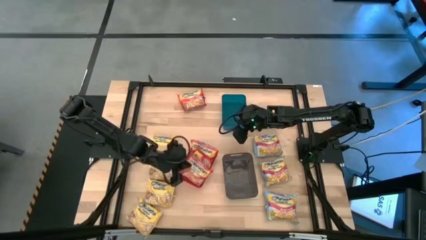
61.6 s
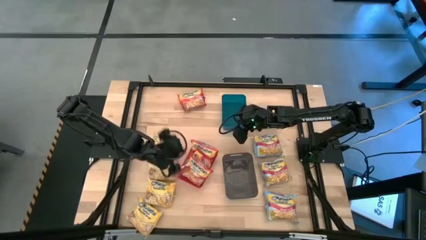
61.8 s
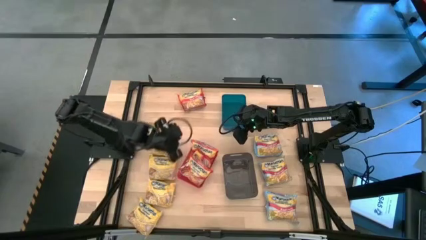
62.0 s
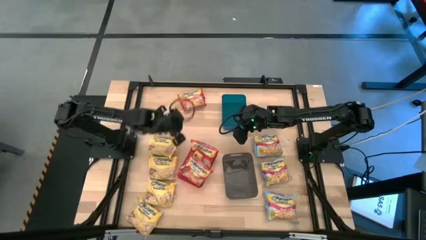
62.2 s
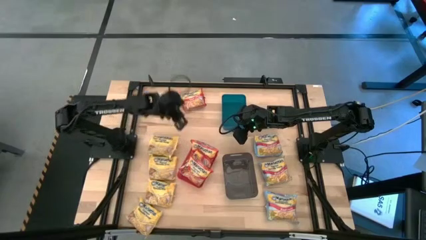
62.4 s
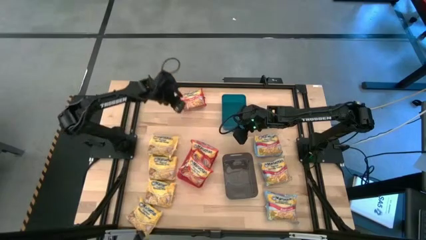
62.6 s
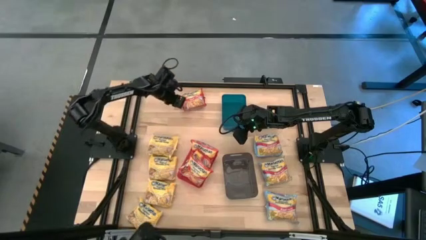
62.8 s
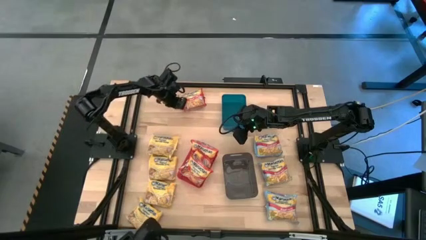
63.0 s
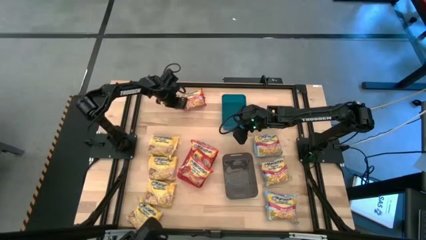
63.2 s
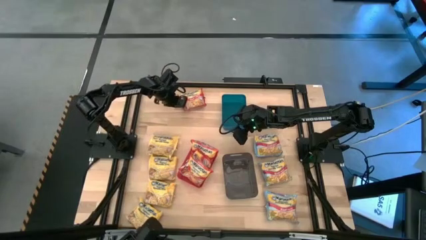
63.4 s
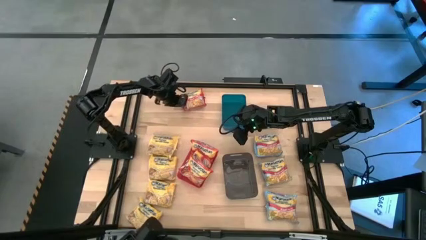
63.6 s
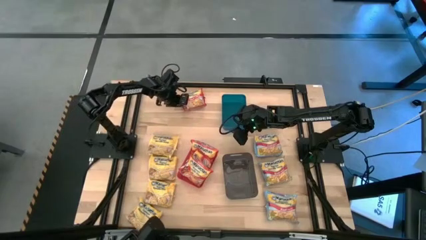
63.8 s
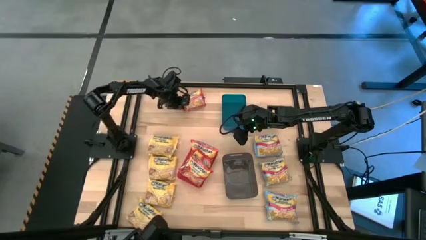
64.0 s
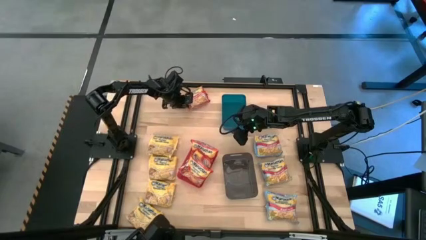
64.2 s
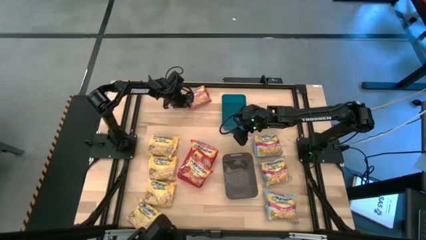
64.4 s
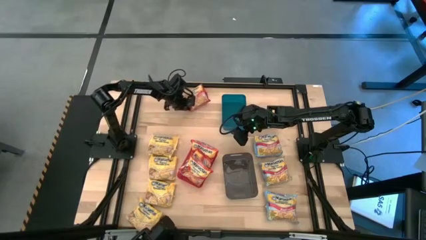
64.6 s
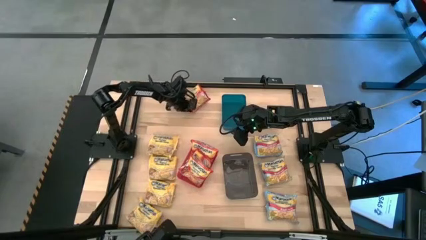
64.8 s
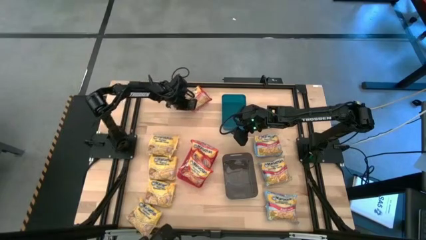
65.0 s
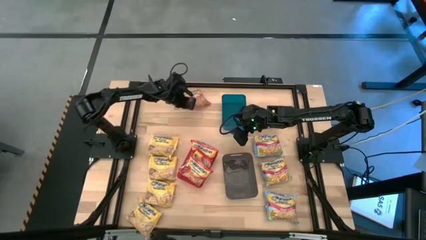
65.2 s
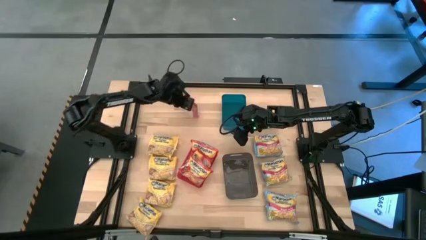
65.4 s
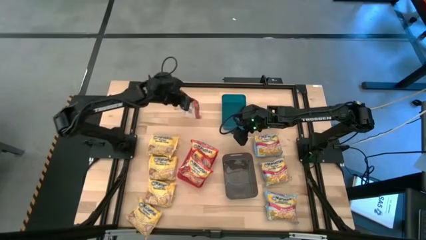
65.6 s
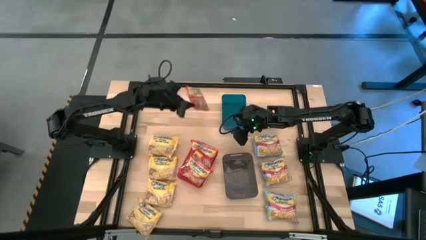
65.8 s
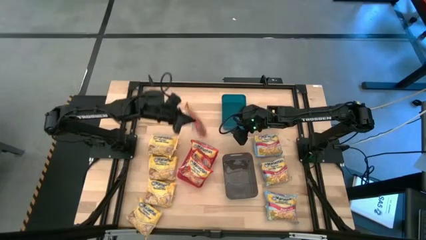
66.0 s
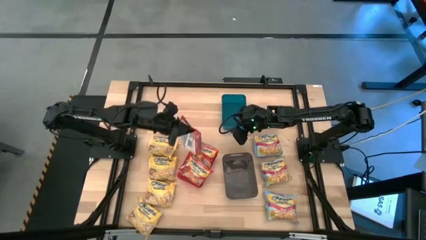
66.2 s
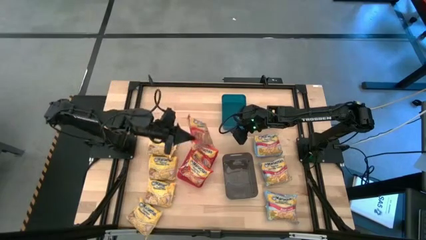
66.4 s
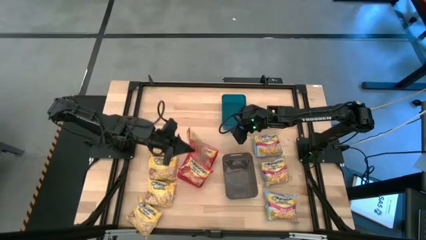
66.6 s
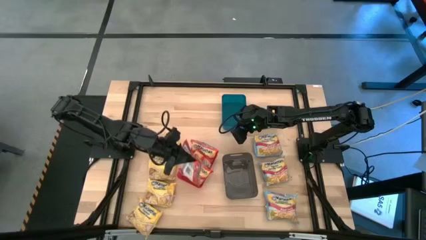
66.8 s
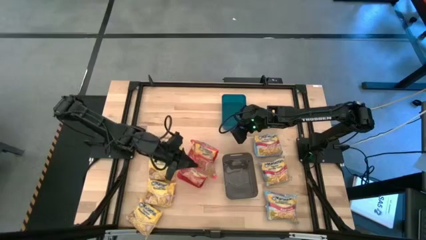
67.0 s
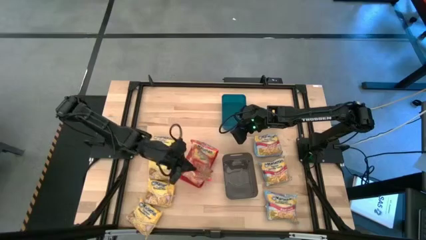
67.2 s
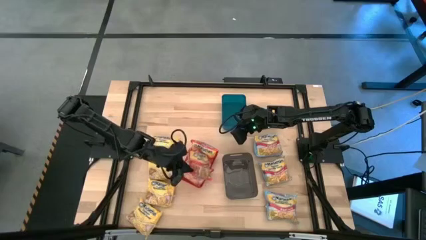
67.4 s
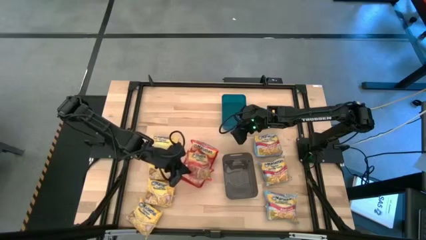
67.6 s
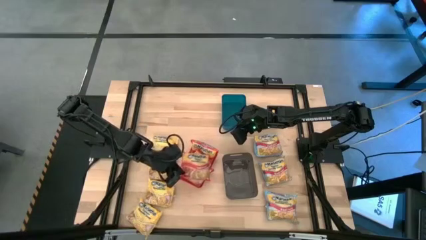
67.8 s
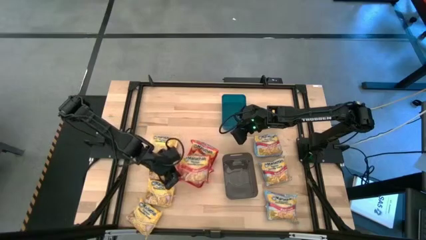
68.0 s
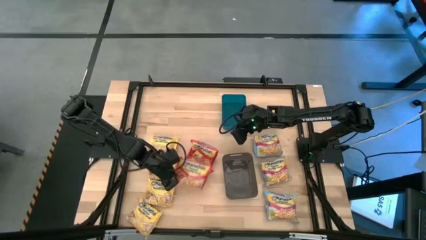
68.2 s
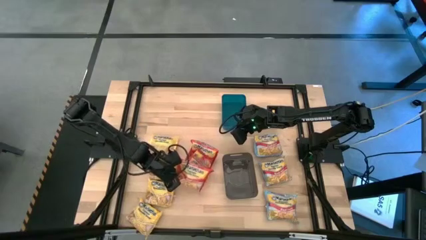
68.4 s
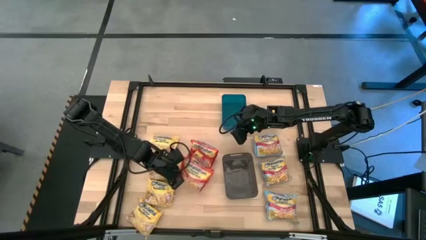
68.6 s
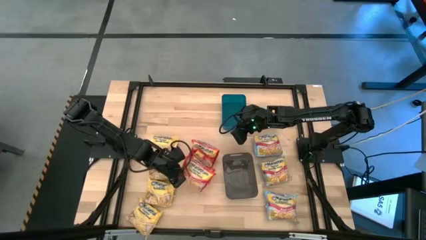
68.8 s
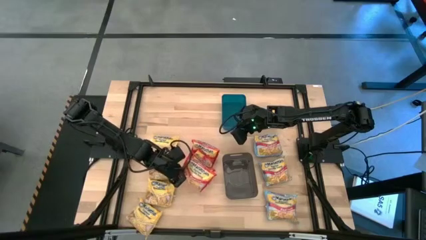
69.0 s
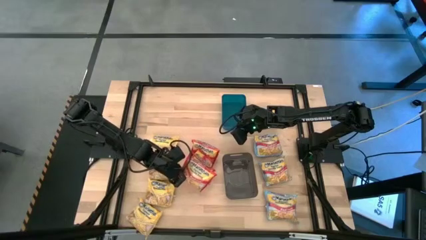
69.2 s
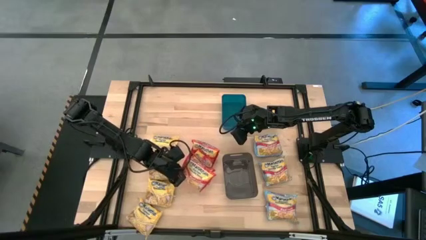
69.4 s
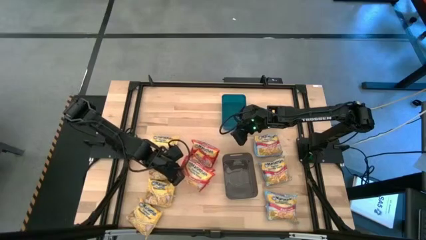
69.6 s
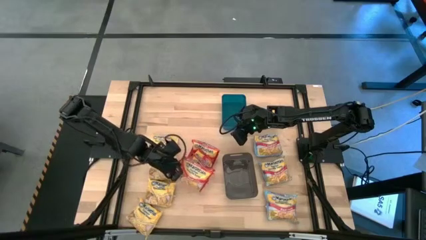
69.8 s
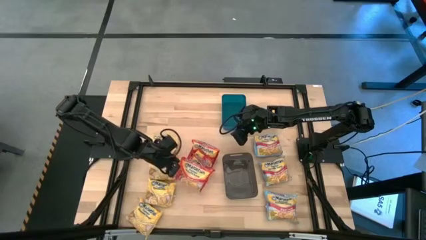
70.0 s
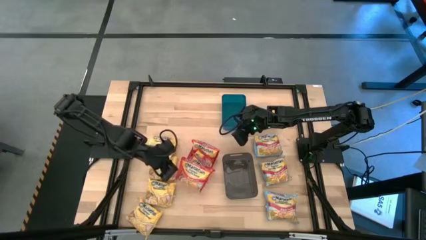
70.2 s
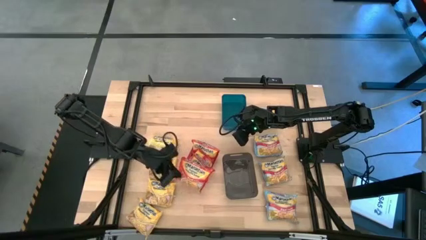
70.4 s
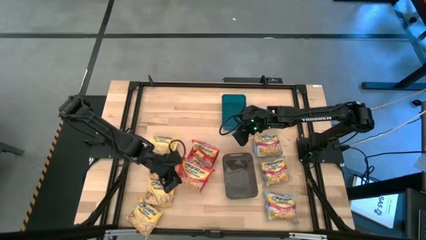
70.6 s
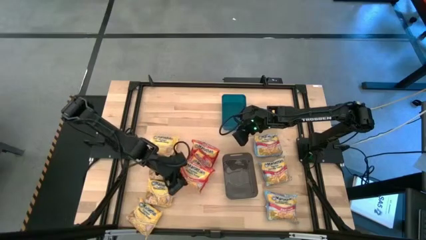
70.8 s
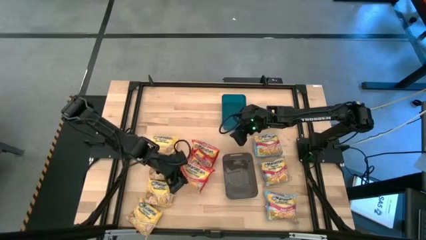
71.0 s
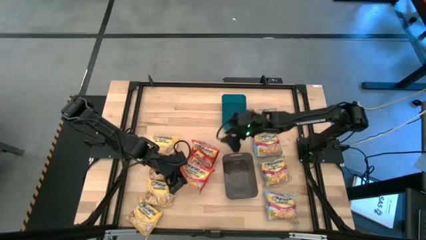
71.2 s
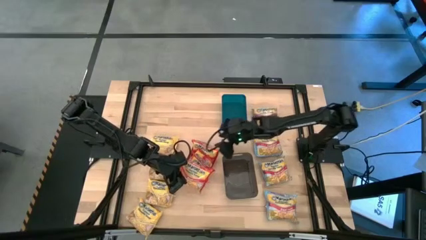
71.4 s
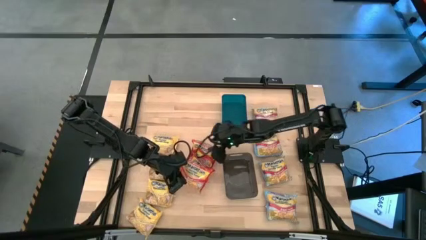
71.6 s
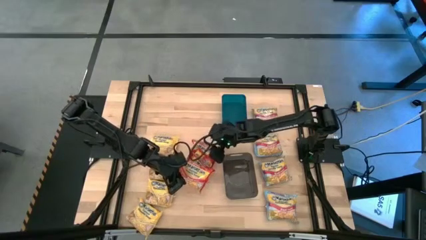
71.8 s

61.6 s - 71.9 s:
Task: Sort Maruchan noodles
Put the red bag into the red bin

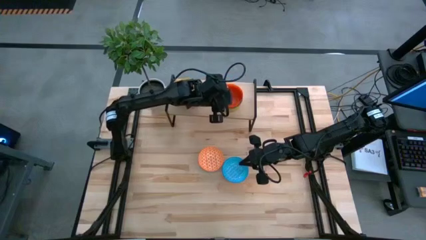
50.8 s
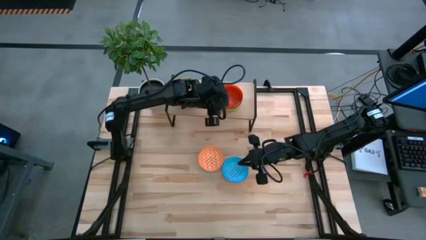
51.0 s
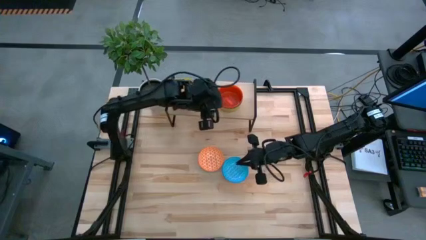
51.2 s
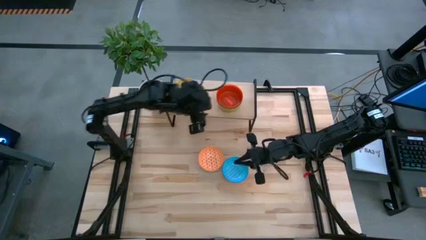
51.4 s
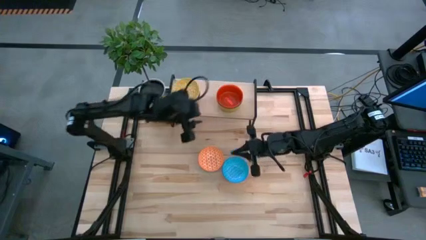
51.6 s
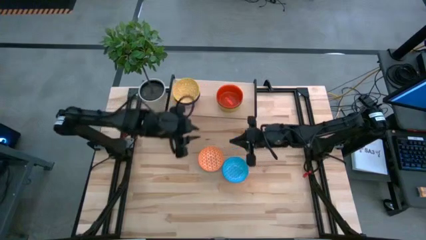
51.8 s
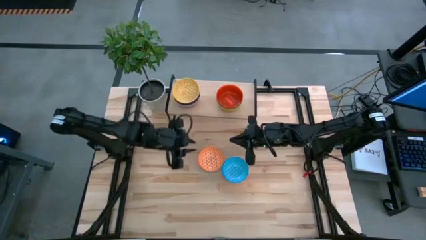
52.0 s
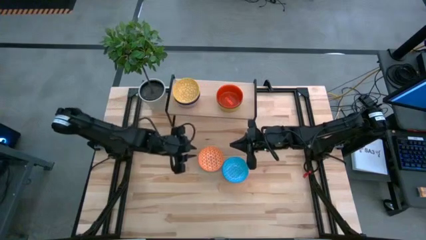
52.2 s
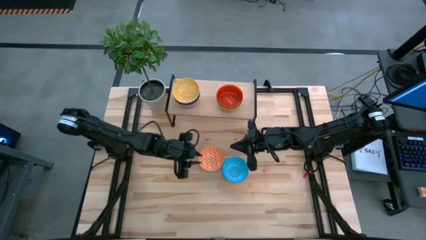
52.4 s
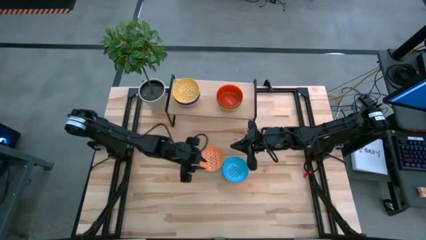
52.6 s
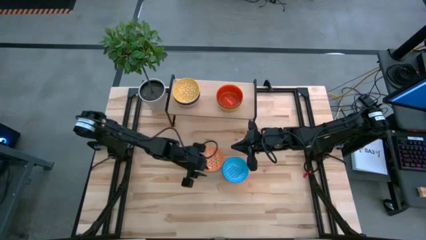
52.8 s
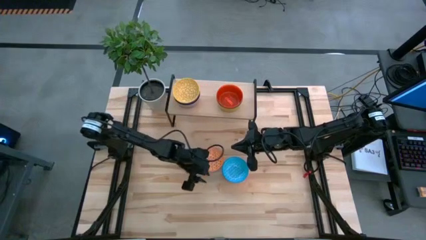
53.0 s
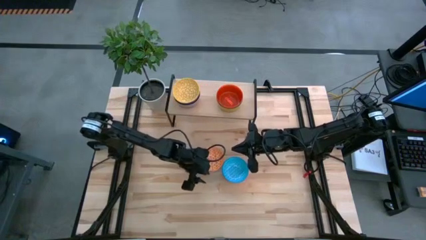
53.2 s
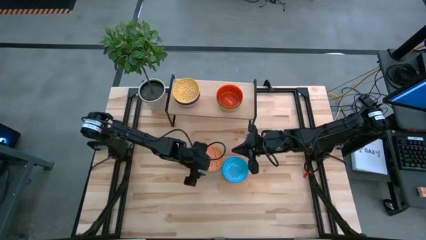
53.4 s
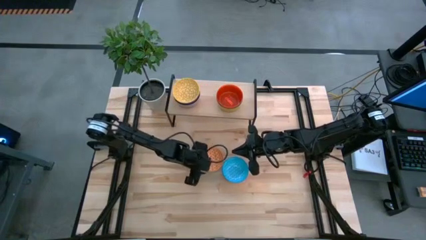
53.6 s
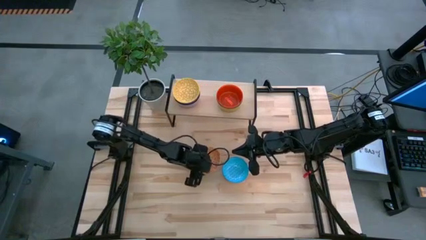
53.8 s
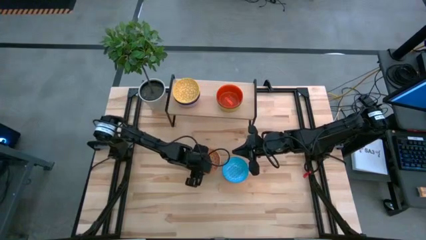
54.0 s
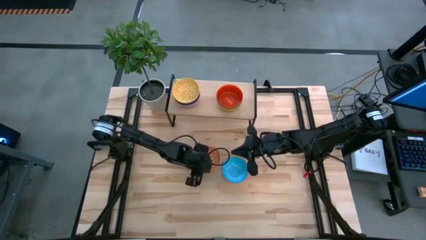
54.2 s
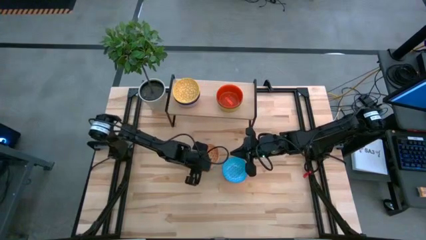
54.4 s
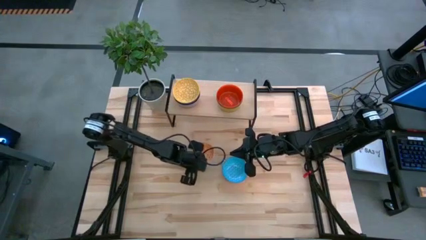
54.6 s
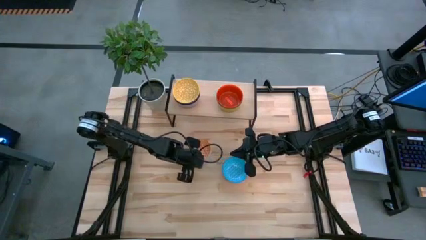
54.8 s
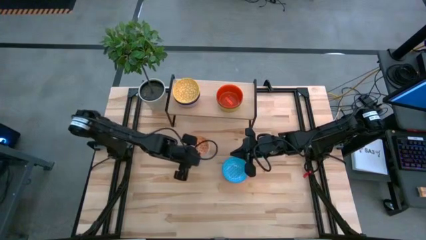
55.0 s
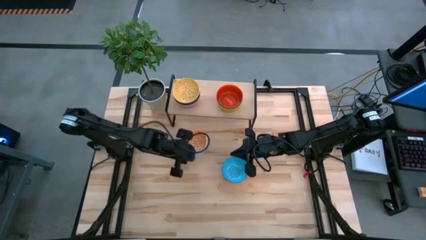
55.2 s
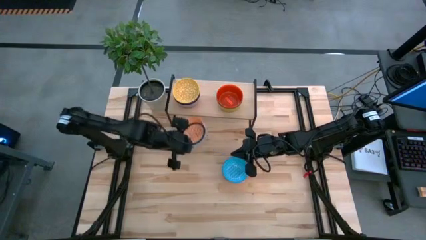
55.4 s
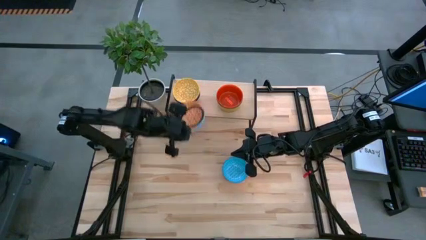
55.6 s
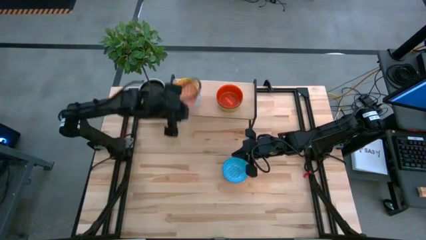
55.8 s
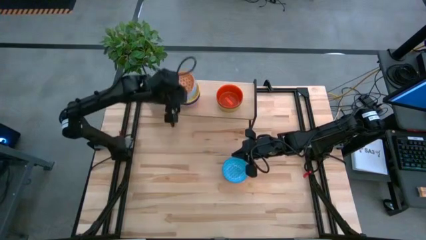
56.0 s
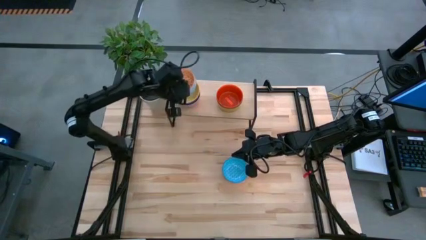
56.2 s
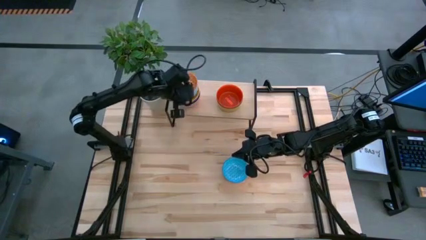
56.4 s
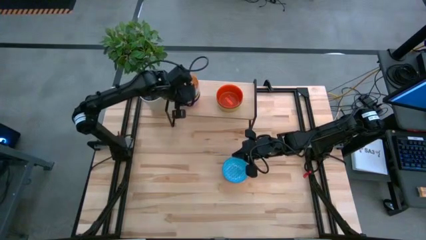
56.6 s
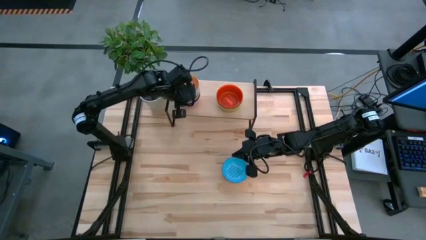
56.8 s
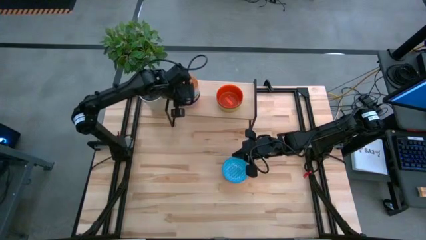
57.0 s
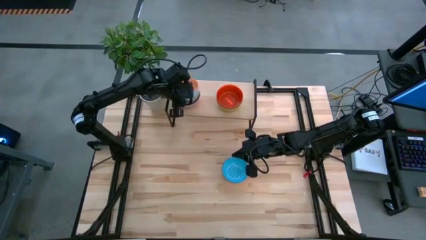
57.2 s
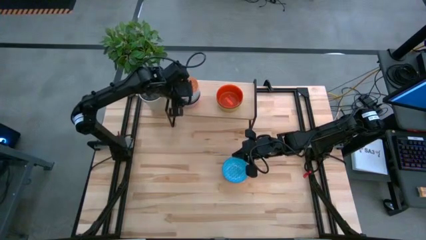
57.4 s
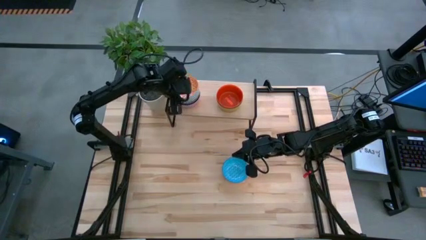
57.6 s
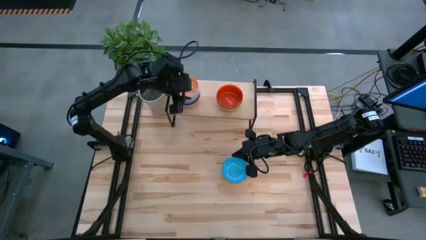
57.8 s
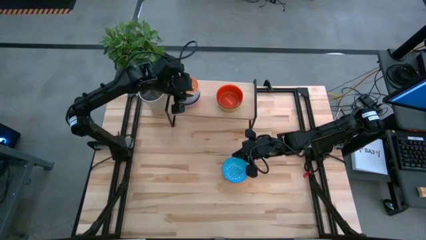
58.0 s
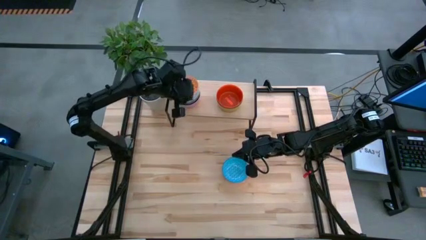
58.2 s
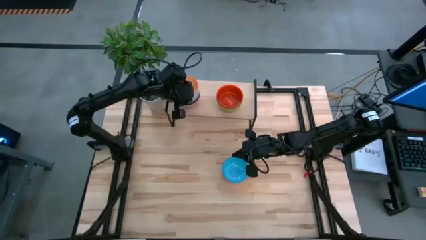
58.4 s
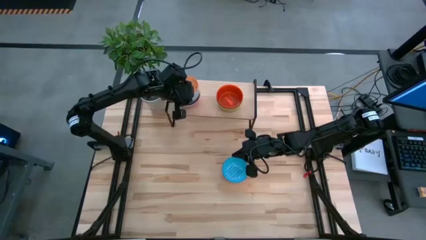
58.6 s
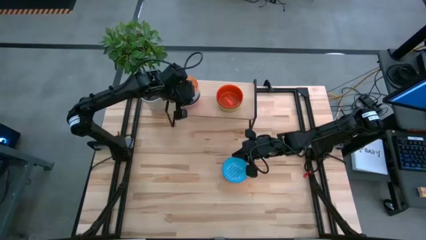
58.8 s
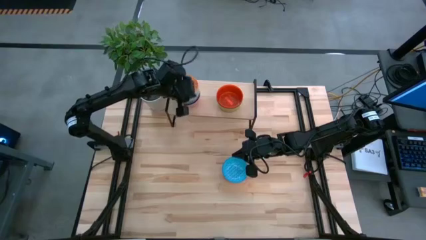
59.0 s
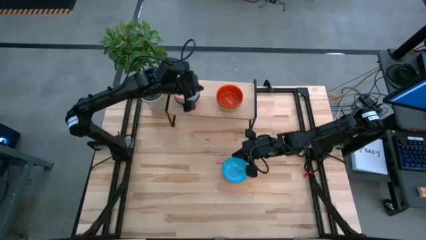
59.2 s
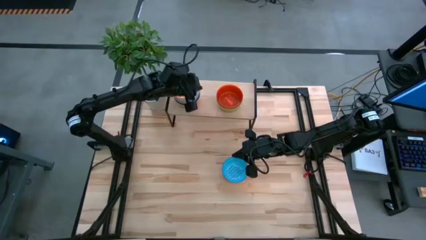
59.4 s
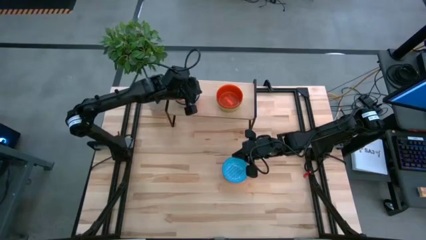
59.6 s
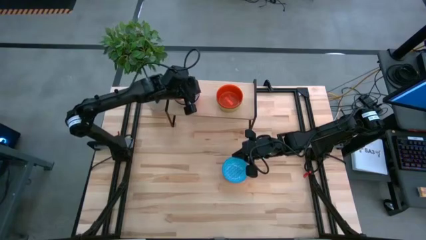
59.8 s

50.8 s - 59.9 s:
Task: Place and stack bowls onto a shelf
Stack the orange blue bowl into the yellow blue bowl on the shelf
